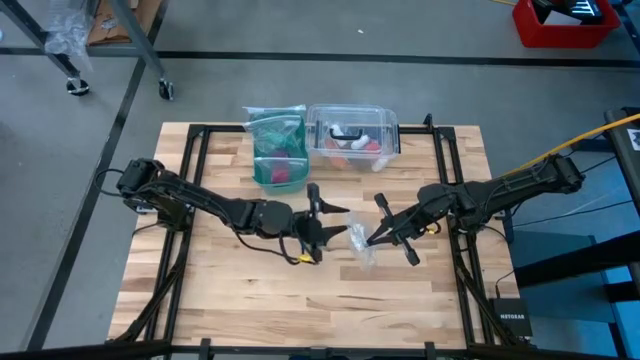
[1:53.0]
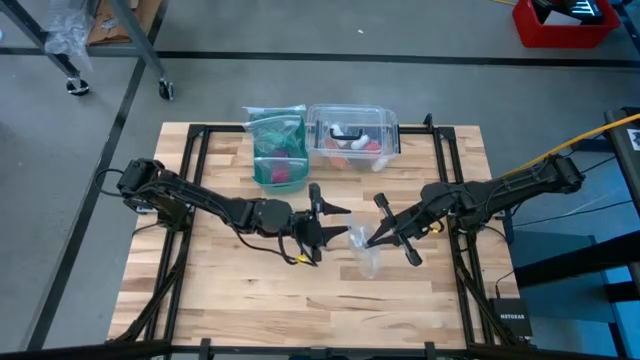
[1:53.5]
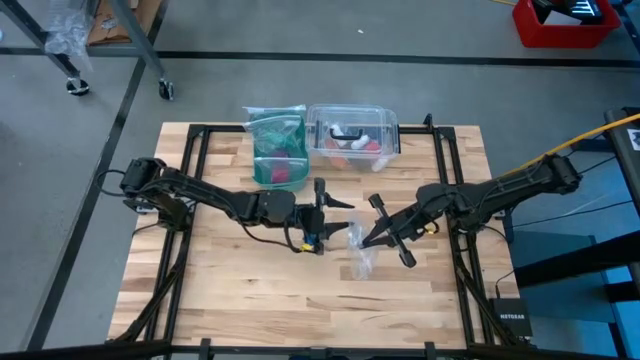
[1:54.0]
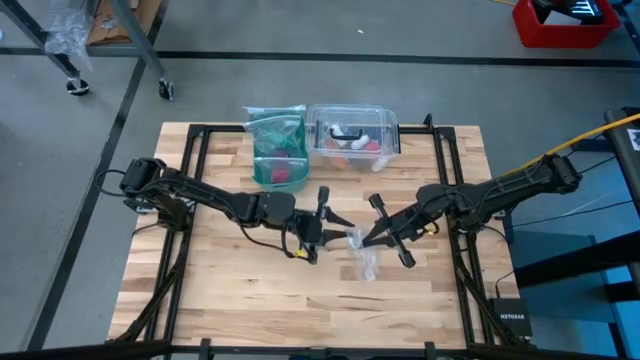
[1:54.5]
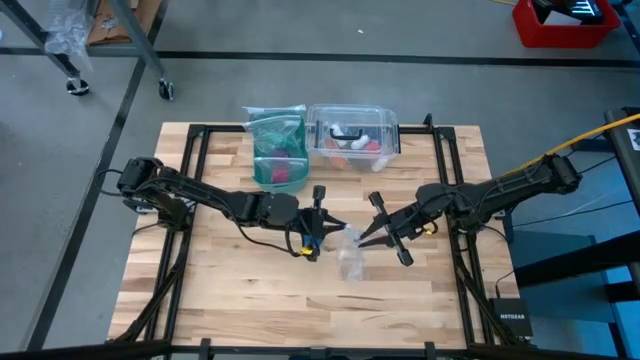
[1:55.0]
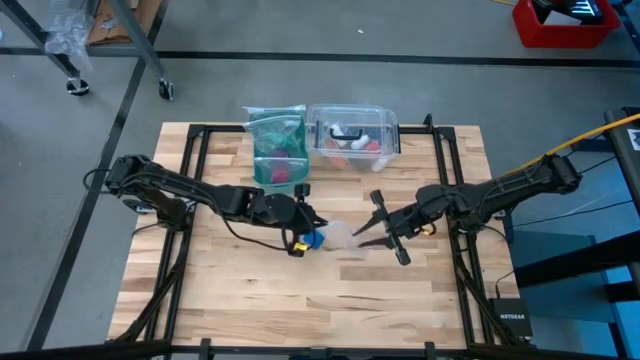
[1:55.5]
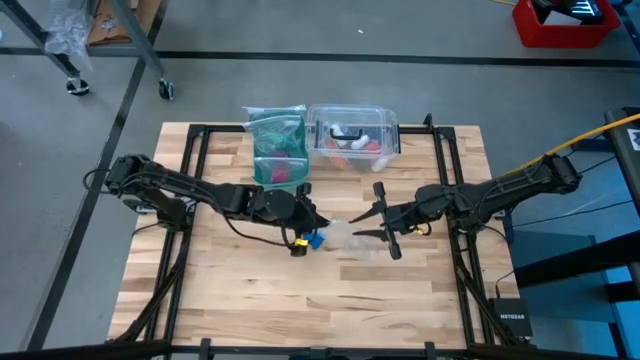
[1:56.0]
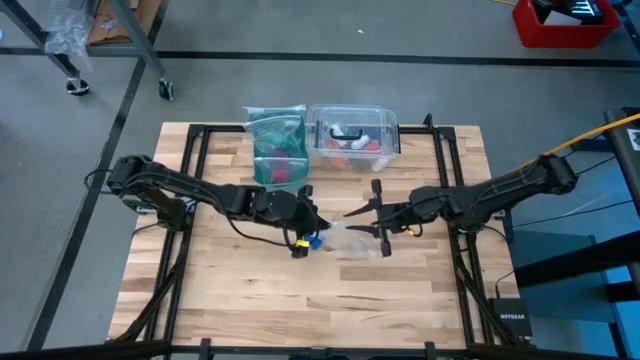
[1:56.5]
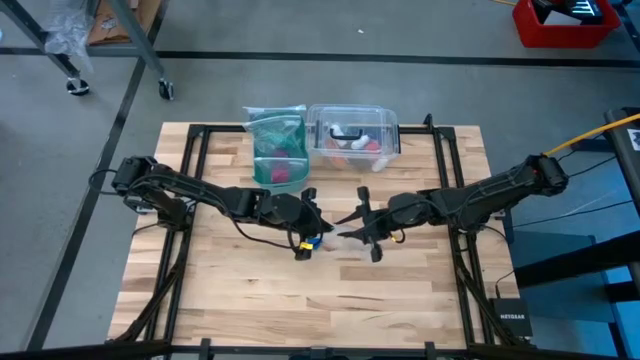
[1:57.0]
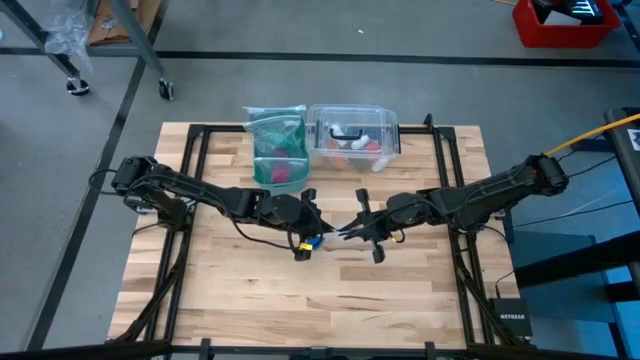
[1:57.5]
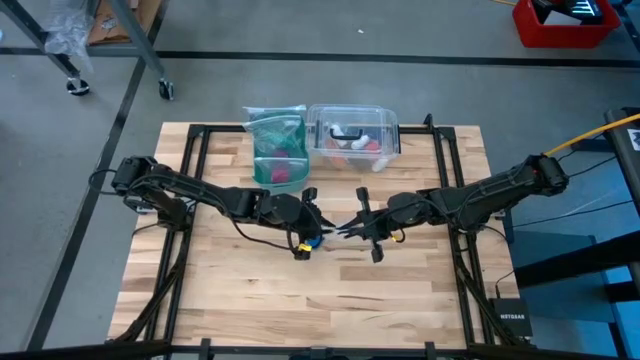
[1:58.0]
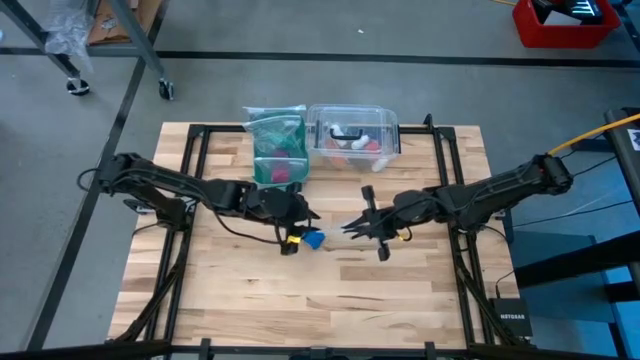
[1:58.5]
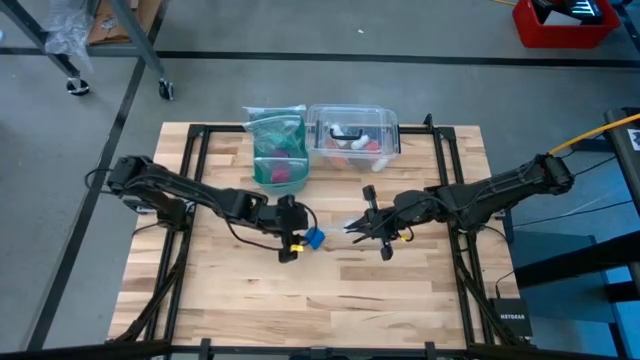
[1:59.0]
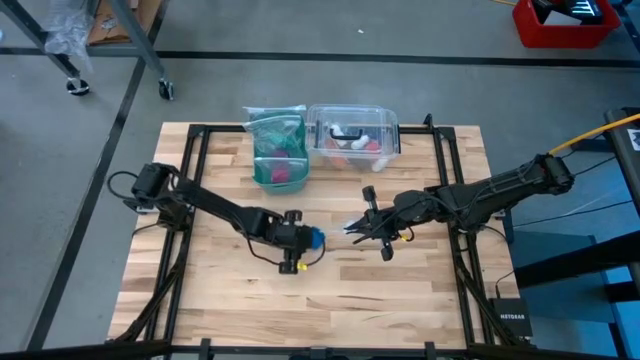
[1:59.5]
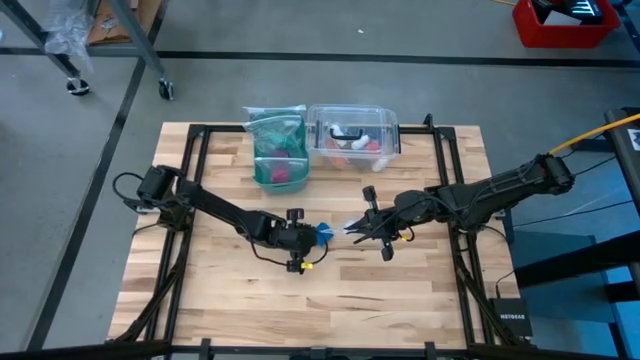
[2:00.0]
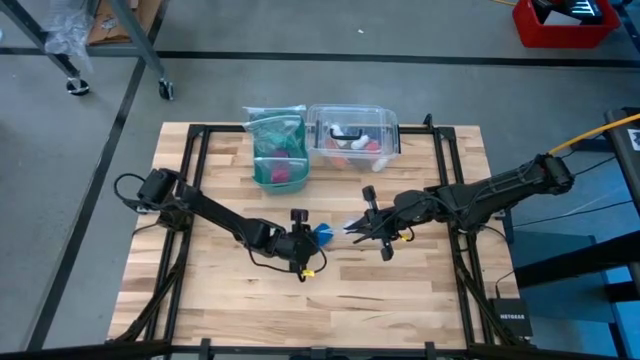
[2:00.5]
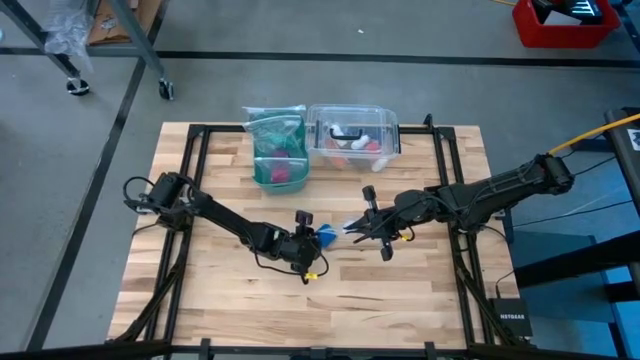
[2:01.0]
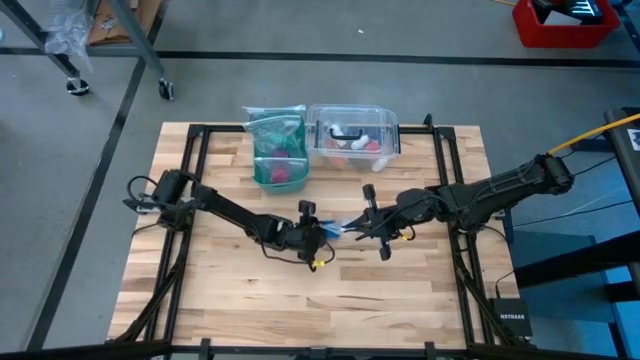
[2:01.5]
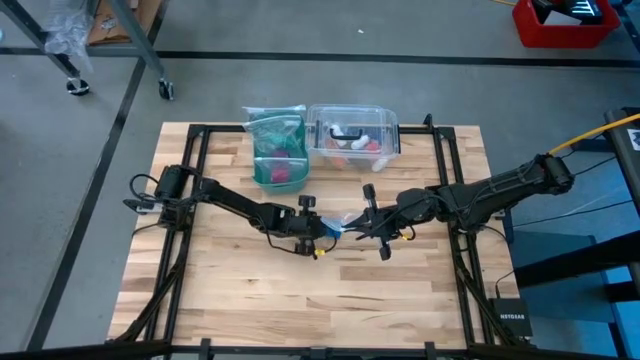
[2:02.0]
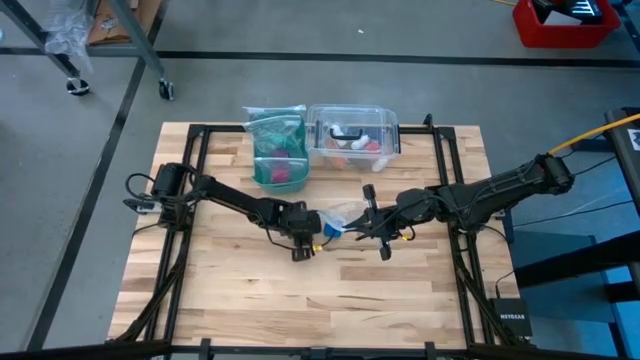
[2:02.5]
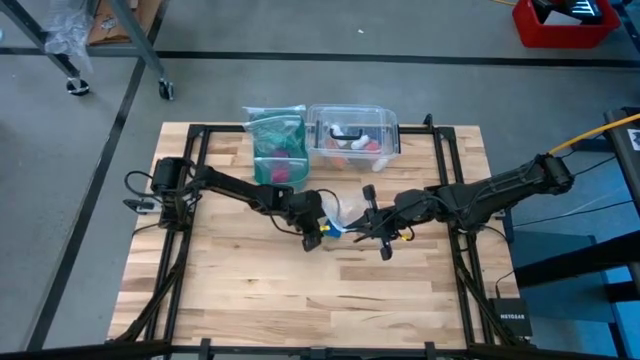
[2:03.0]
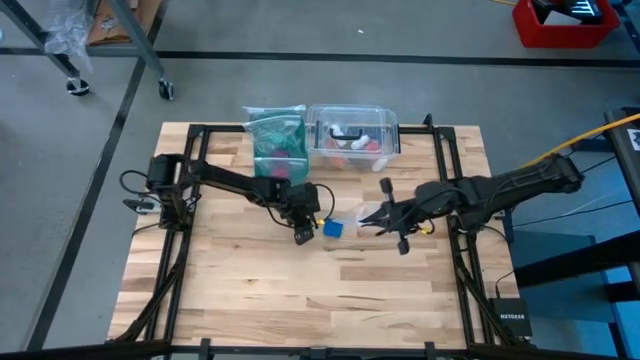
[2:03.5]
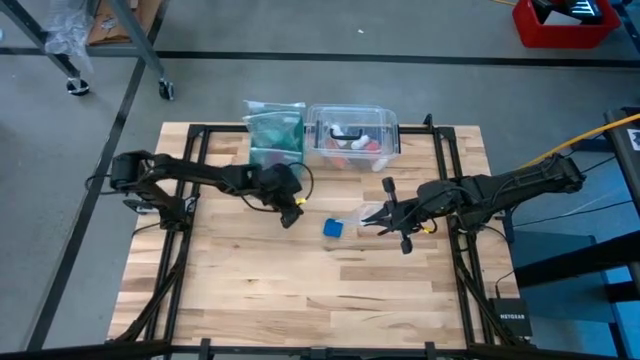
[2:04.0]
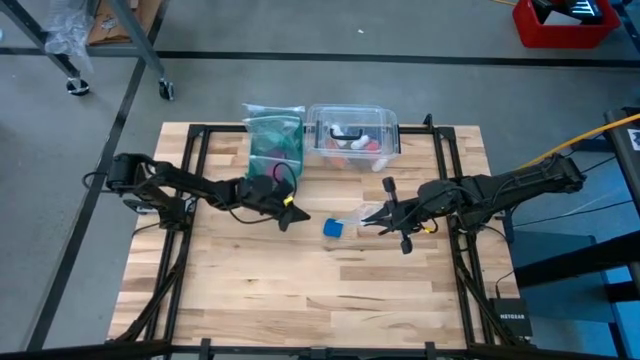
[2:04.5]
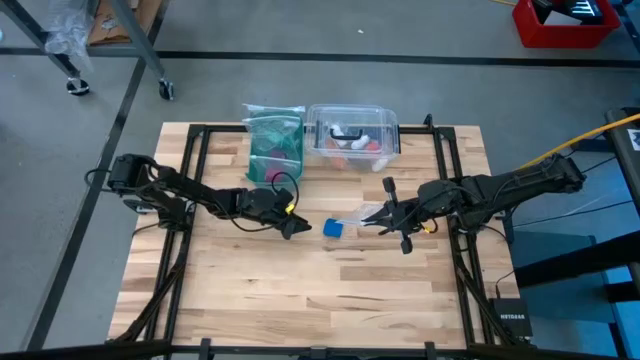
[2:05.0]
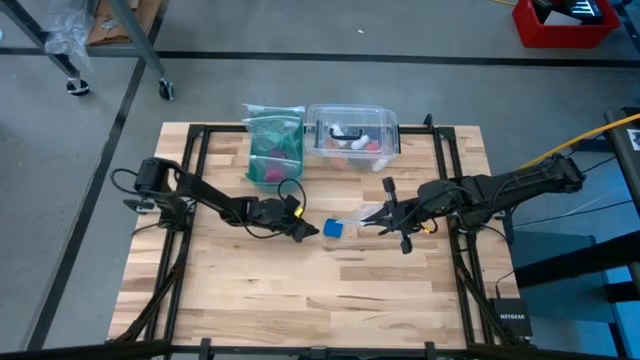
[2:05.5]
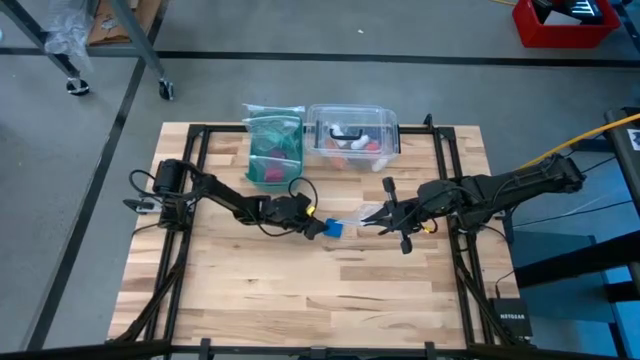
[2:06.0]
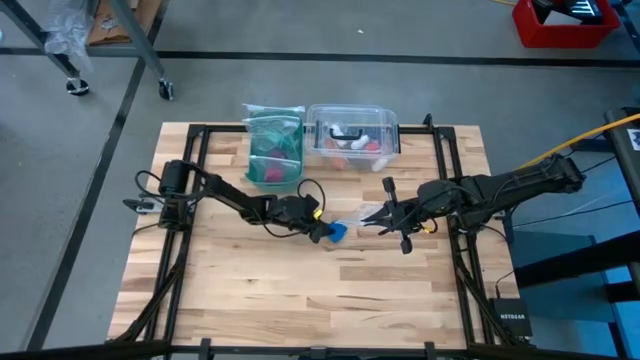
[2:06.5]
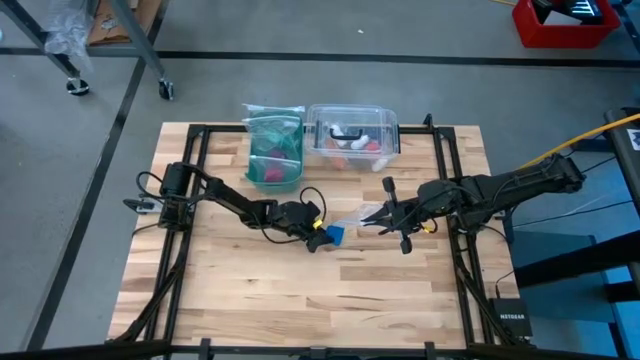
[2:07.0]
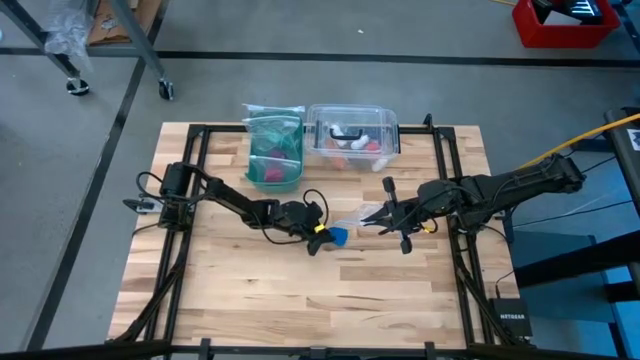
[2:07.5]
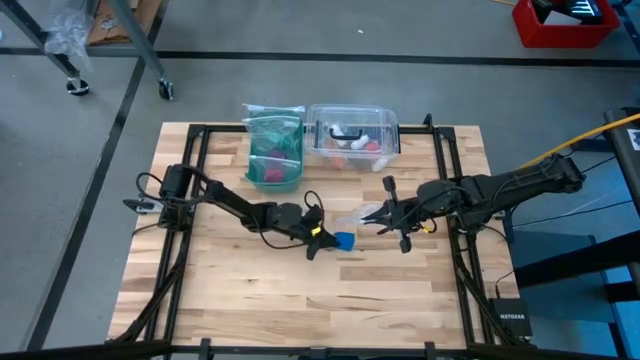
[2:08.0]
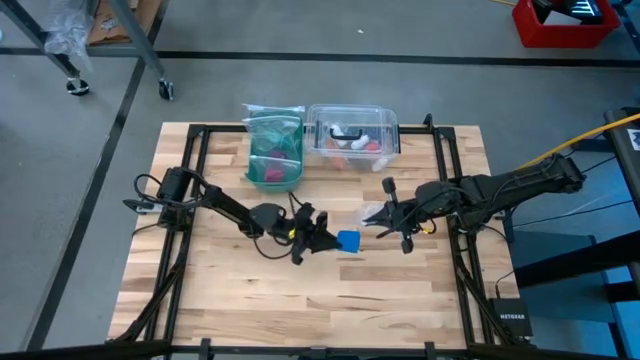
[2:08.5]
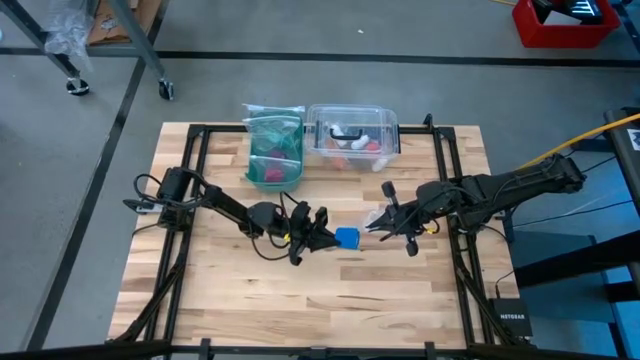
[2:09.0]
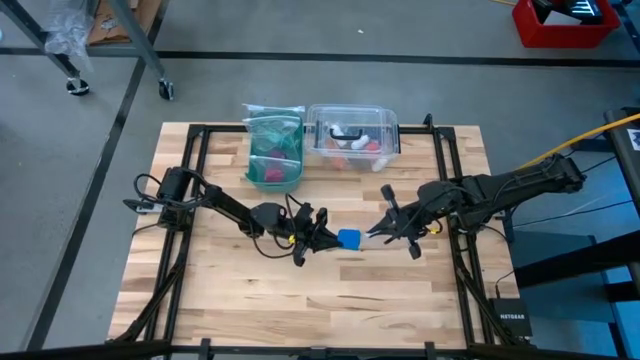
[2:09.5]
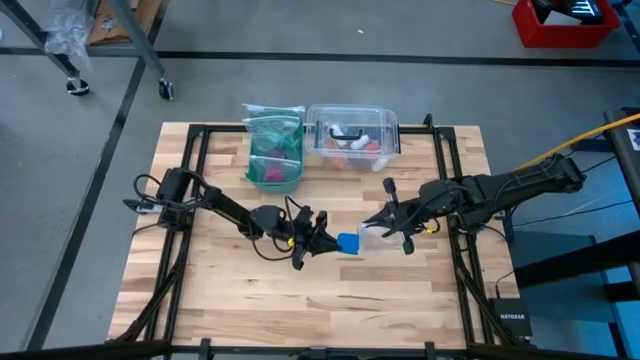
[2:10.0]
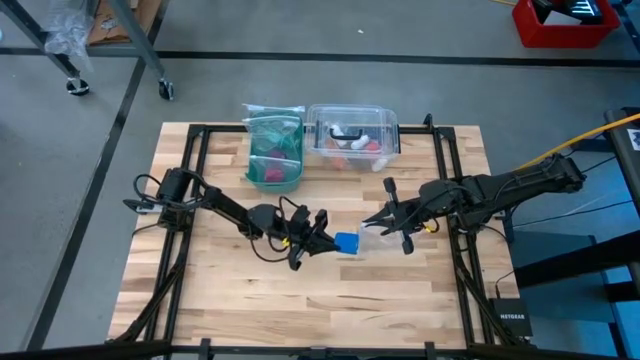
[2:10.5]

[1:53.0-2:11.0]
Task: Roll bandage
Put the blue bandage into the transparent zip bag

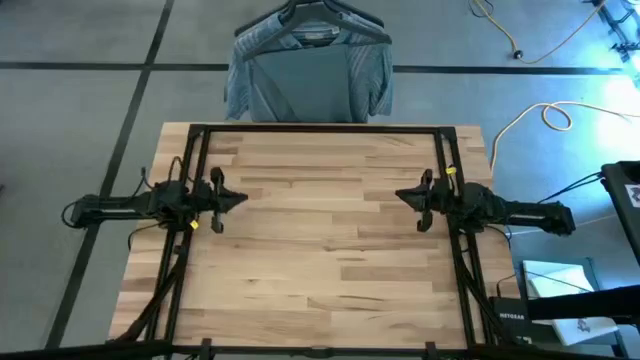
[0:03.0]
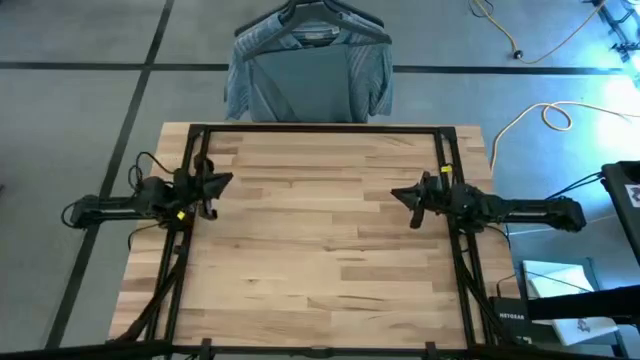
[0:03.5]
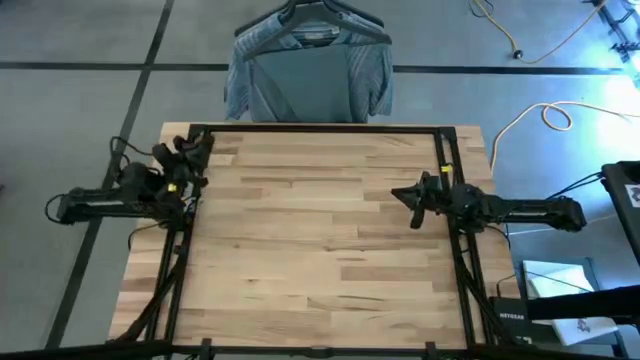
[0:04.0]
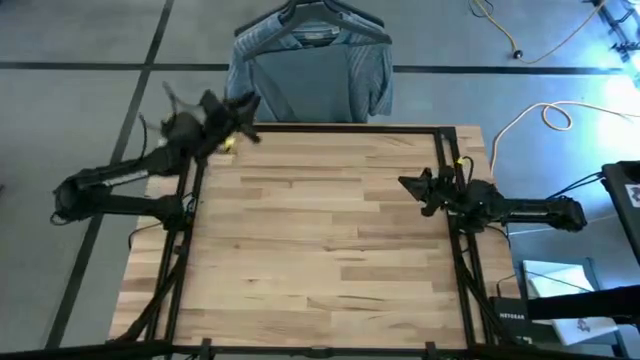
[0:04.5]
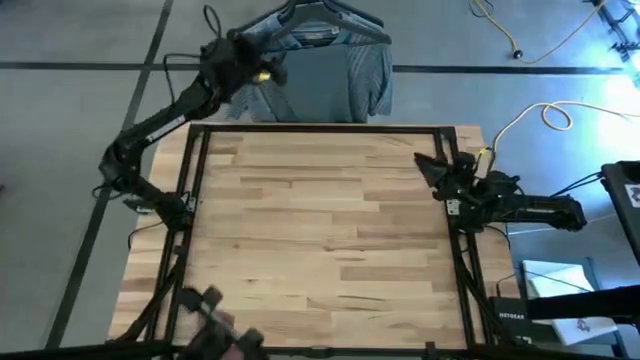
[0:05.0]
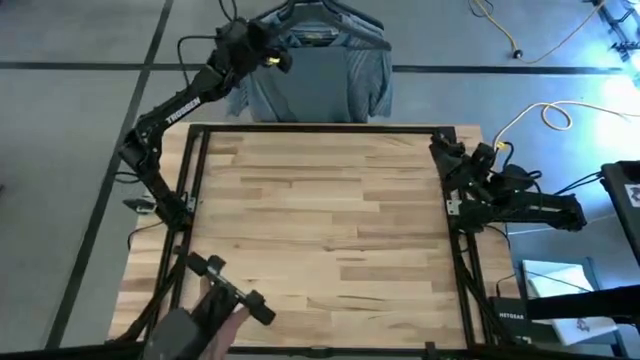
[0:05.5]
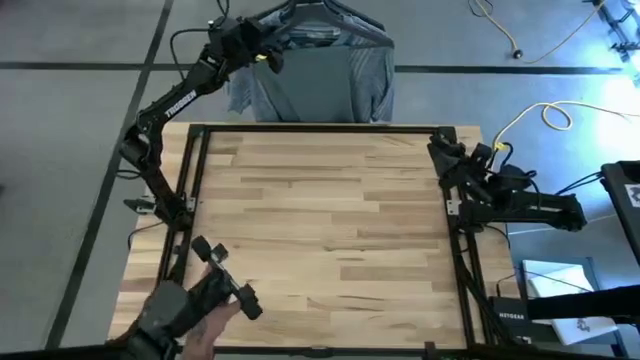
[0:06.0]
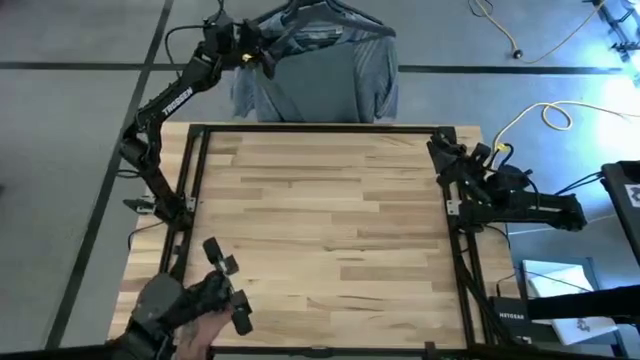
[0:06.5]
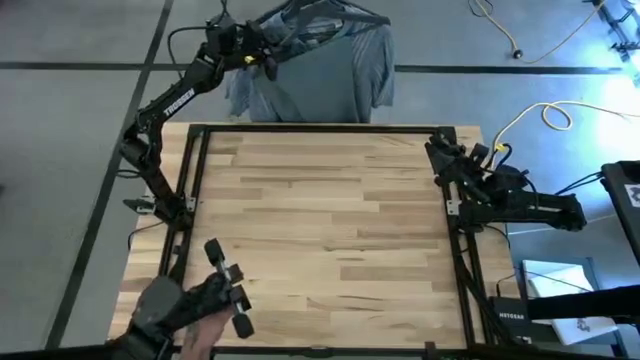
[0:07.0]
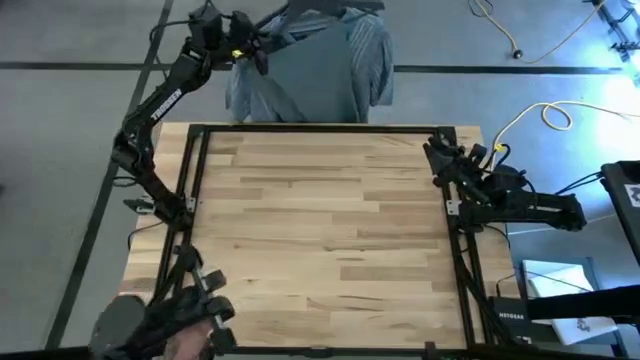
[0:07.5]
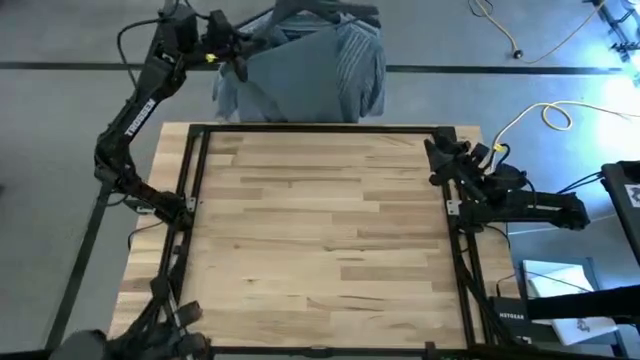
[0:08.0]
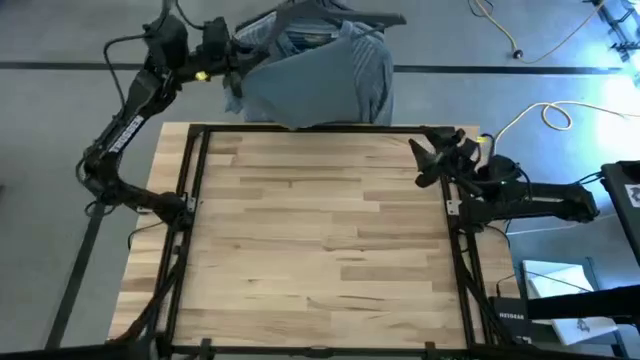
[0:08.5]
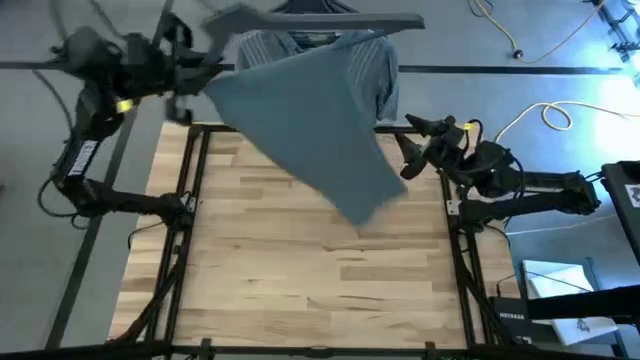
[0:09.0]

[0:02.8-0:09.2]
Task: Unhang clothes
Remove the jeans from the hanger
